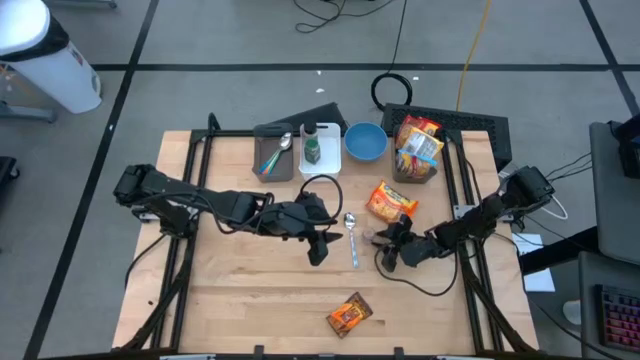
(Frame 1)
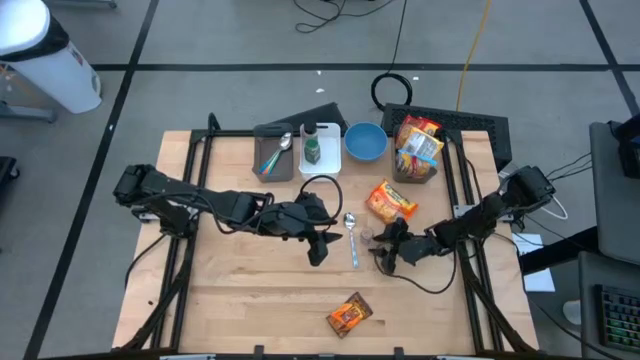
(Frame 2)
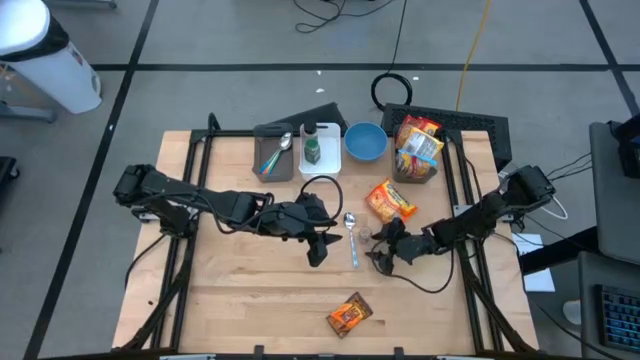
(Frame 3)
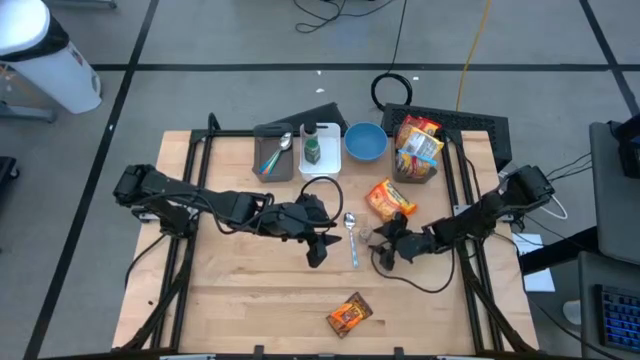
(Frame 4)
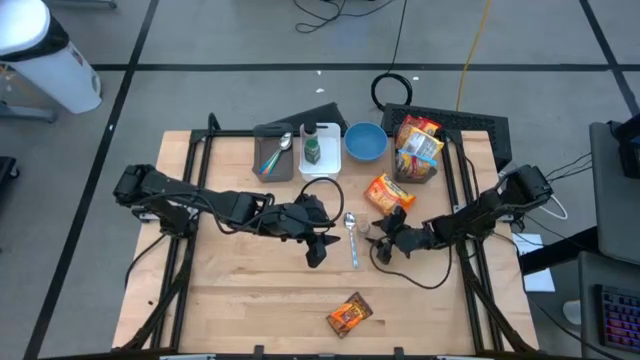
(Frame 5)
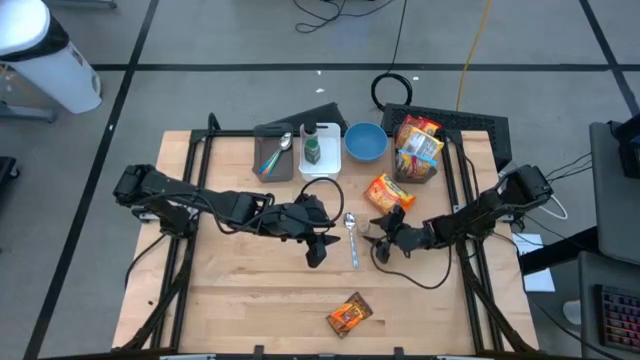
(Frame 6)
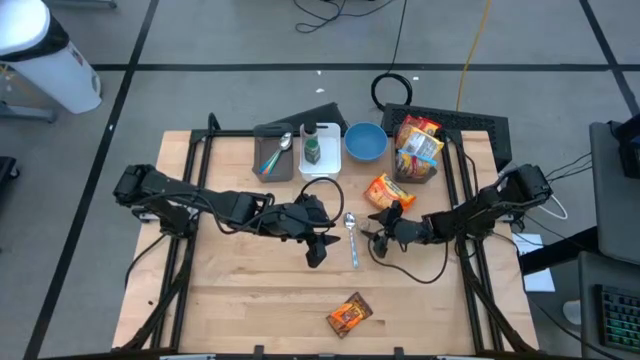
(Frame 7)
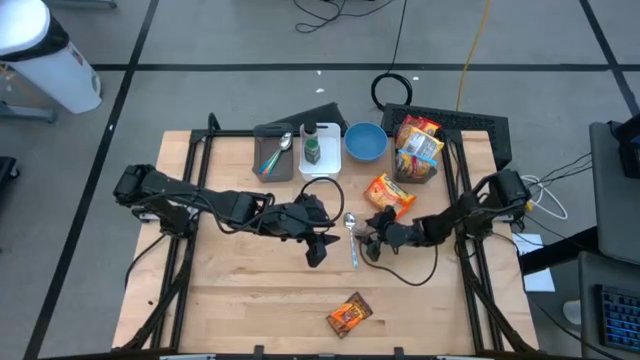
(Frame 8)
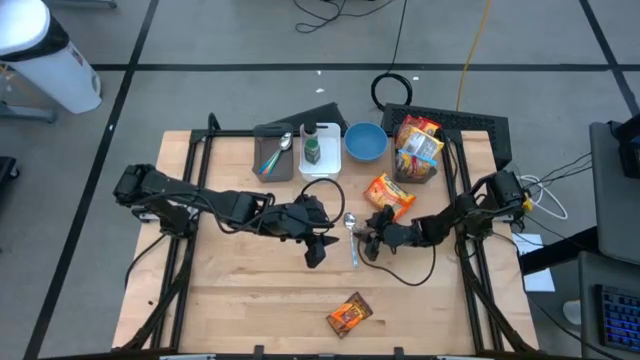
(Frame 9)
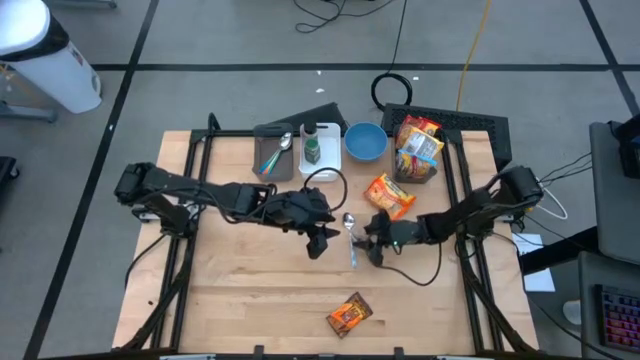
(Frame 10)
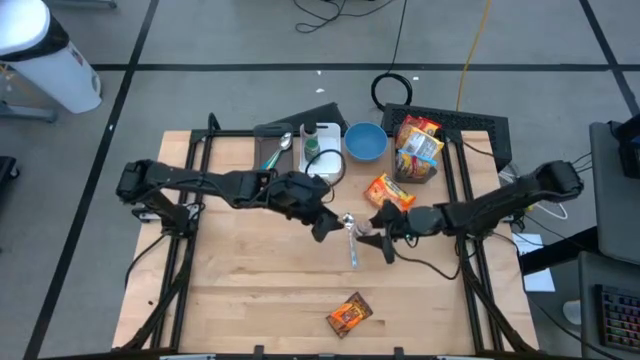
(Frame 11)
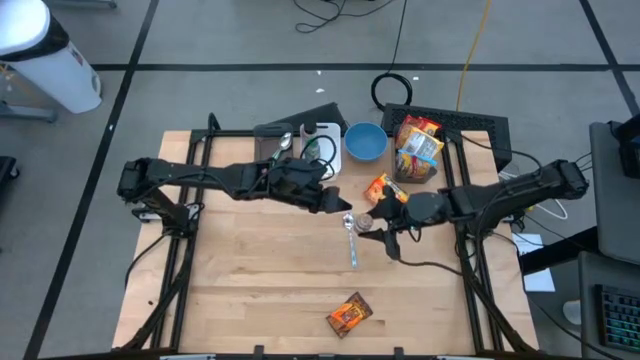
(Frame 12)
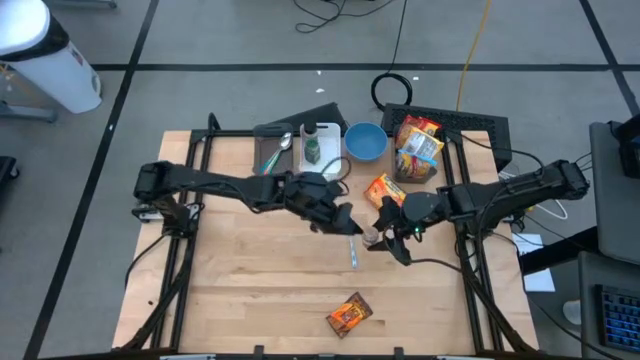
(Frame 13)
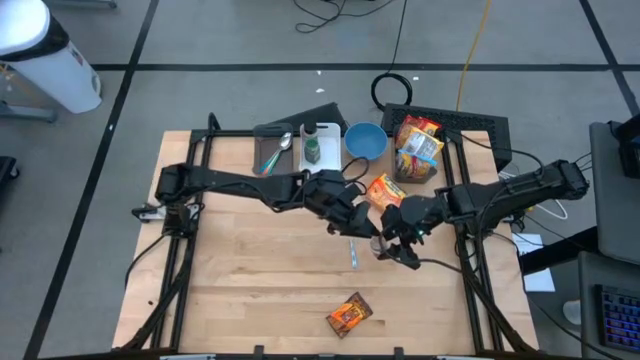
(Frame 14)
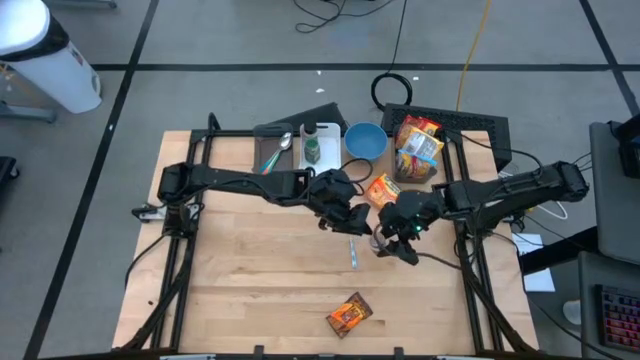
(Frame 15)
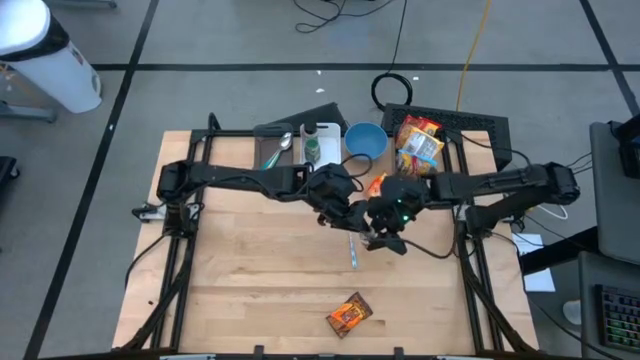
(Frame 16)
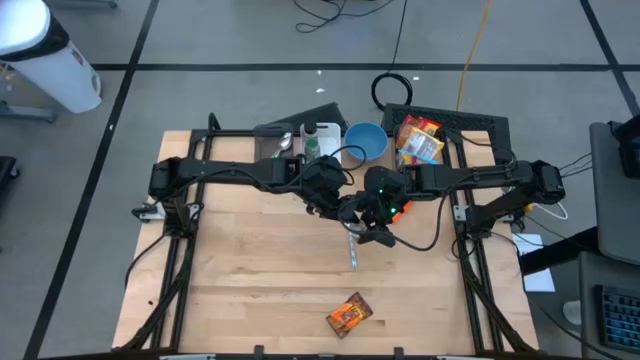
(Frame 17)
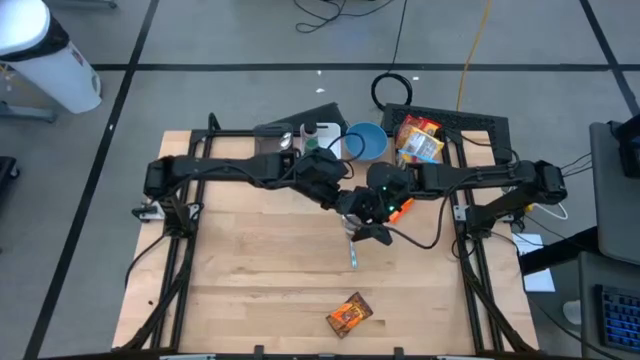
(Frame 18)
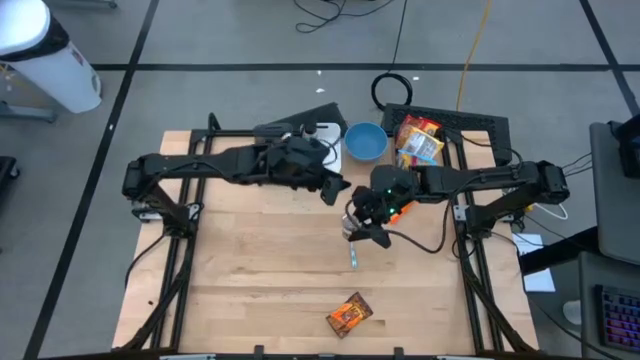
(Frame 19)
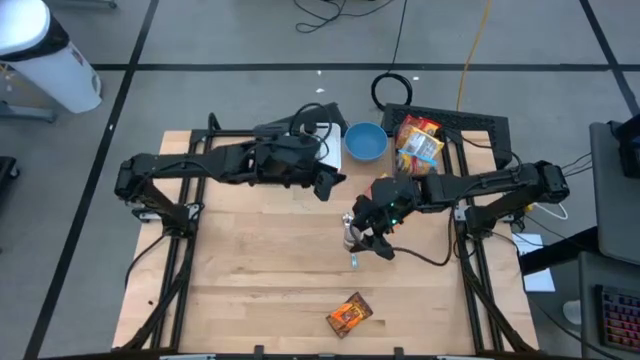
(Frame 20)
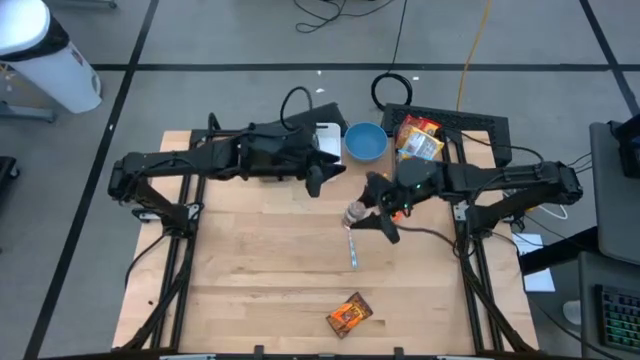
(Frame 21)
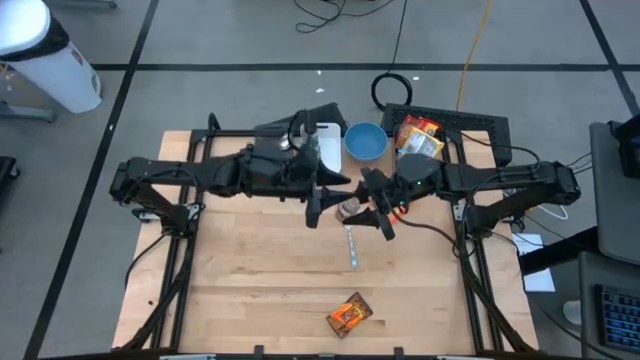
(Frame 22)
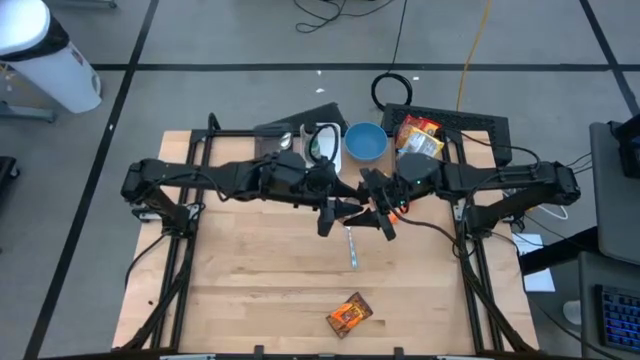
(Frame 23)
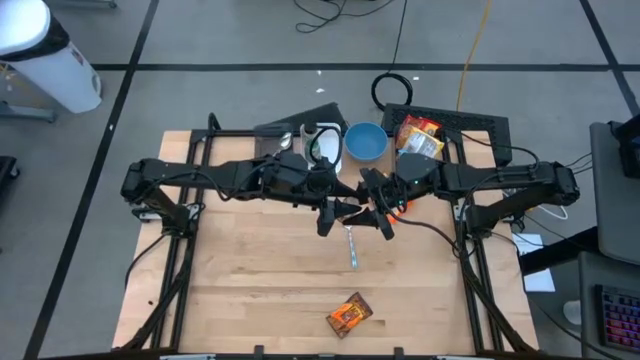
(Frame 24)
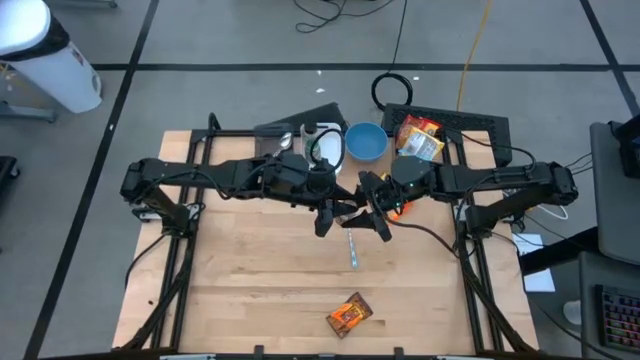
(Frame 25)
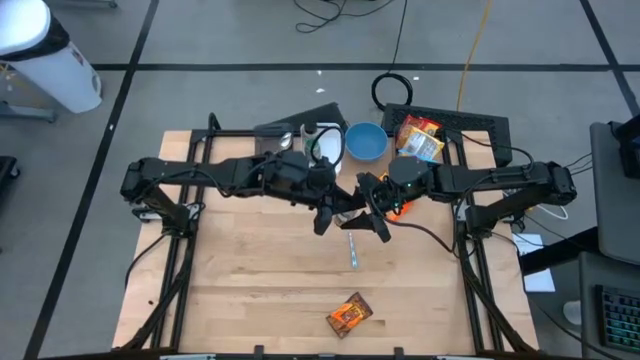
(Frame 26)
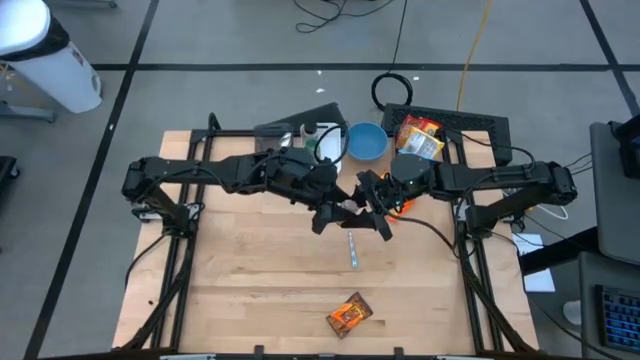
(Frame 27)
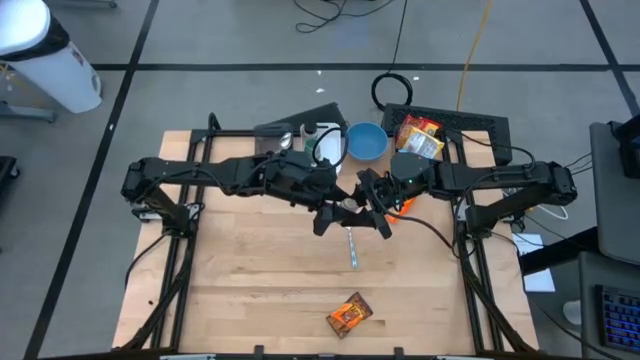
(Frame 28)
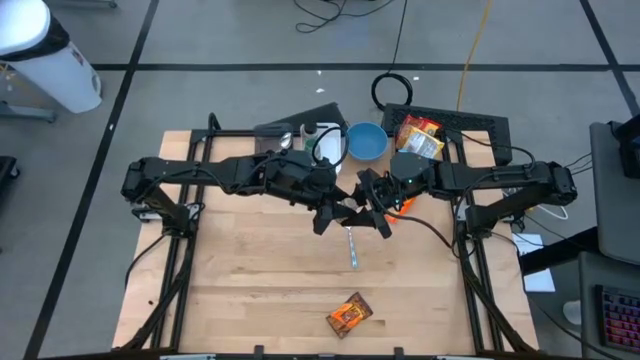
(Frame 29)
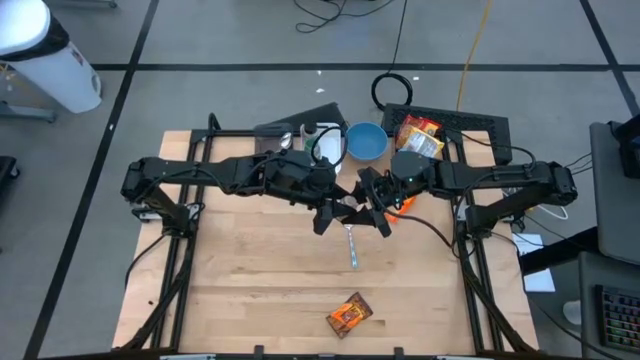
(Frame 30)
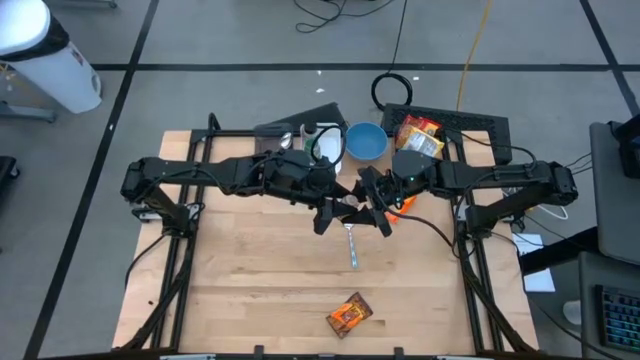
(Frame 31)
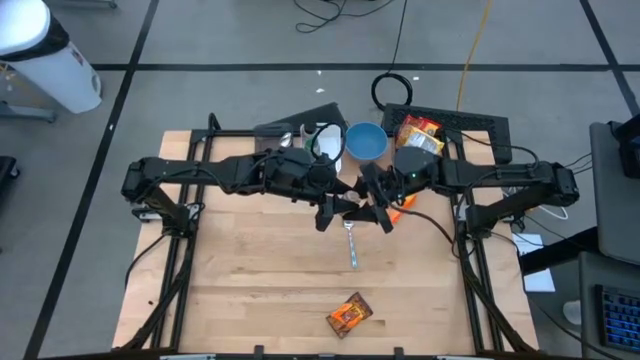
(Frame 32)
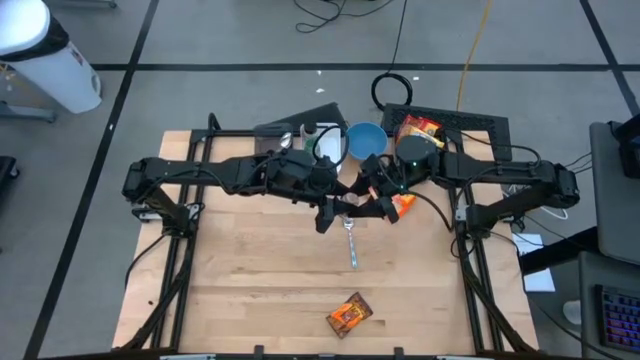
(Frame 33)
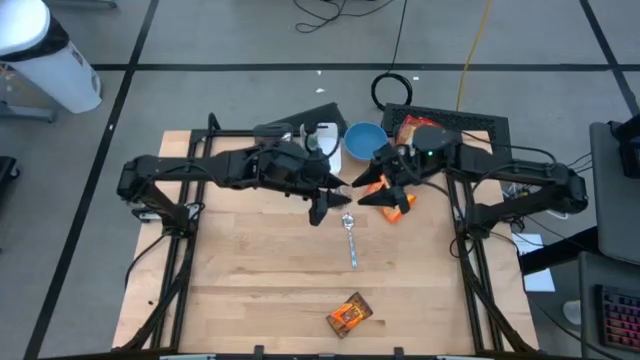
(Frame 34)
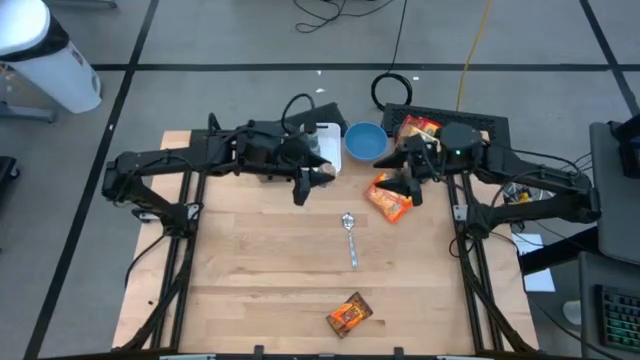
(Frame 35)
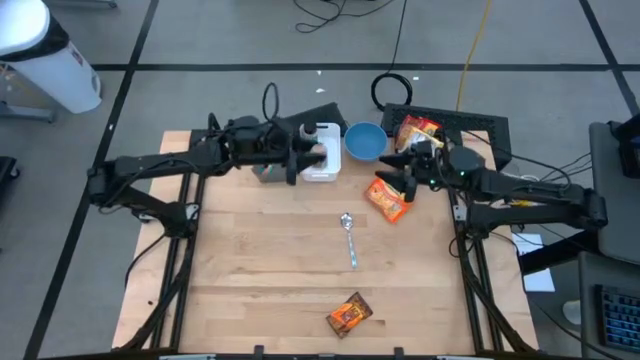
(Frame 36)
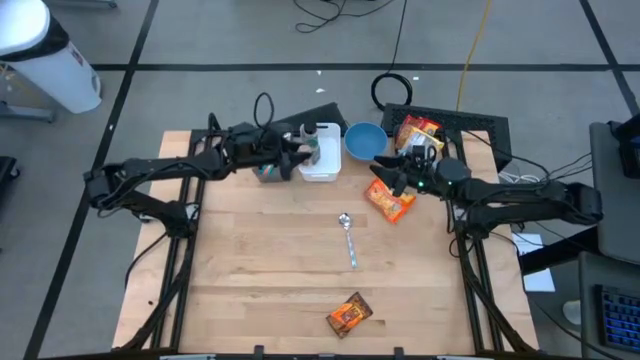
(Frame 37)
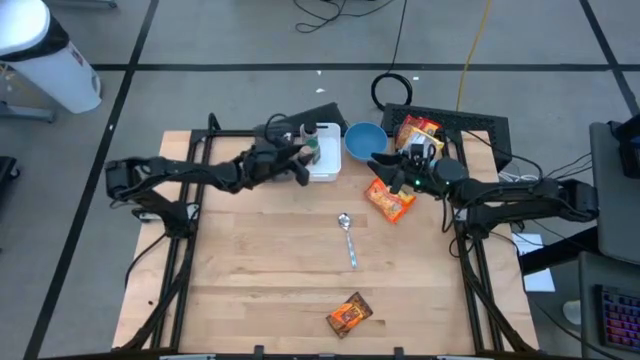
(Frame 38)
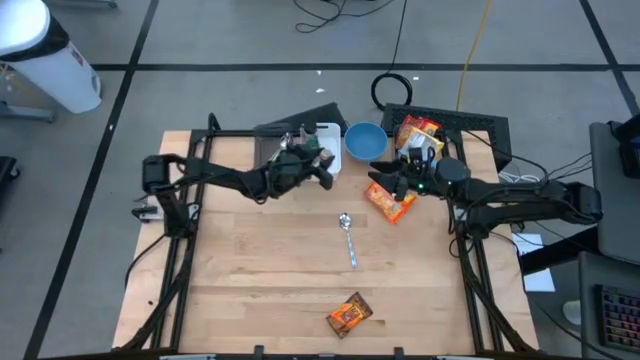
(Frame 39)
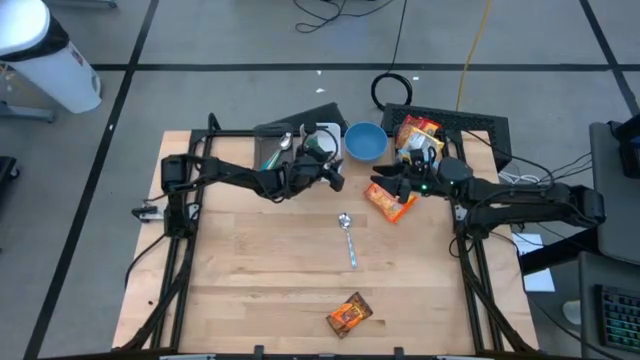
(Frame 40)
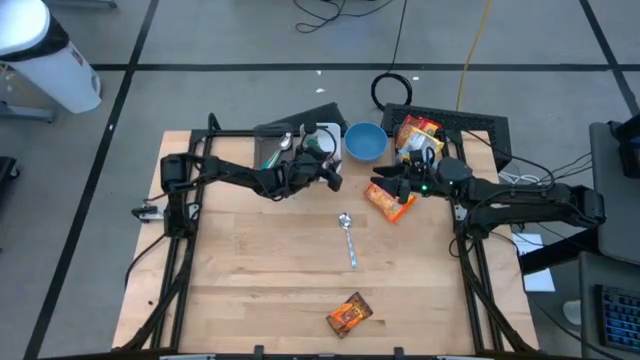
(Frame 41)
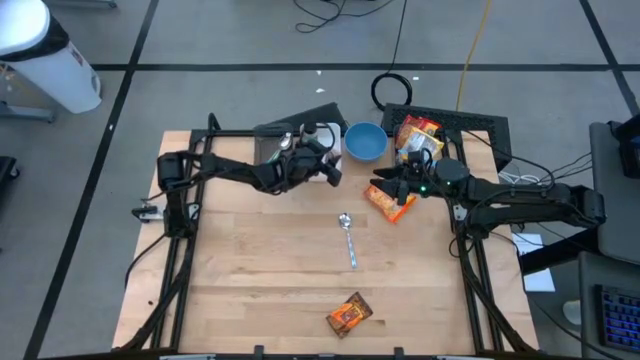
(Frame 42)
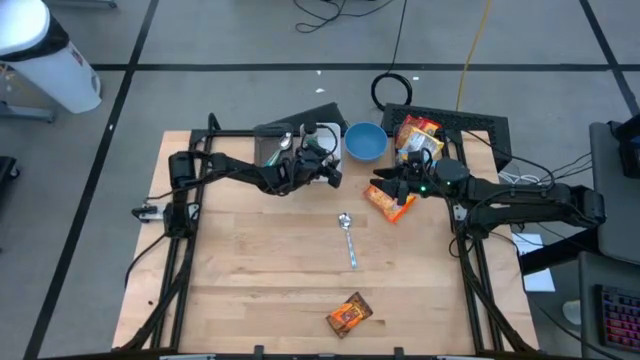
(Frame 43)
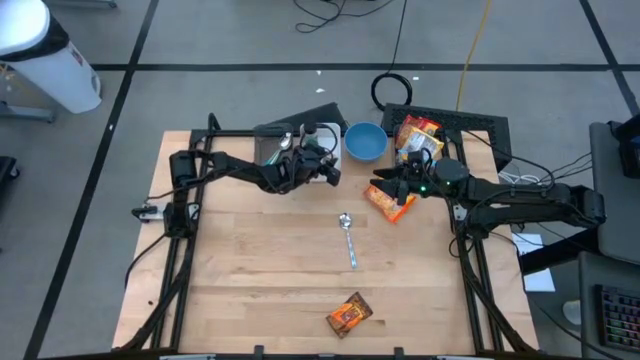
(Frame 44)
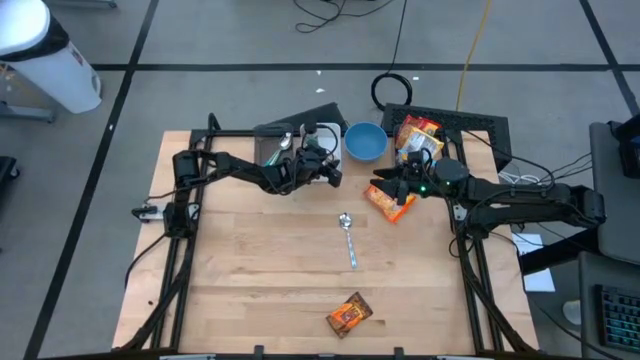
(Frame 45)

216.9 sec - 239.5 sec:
Task: Pick & Place Food Item
Put the brown seasoning bottle into the white bin
